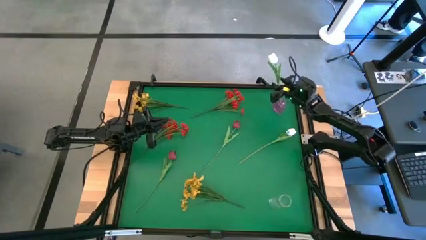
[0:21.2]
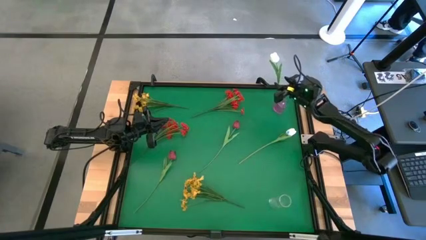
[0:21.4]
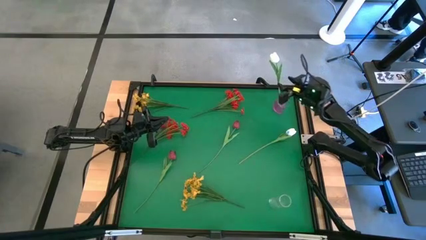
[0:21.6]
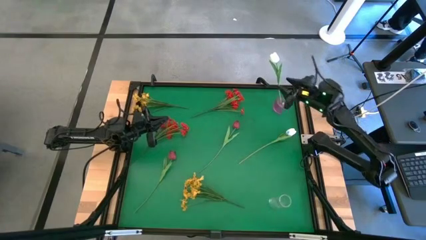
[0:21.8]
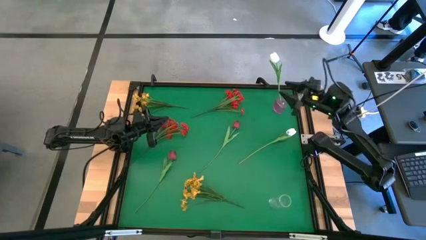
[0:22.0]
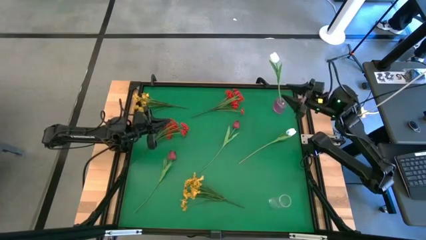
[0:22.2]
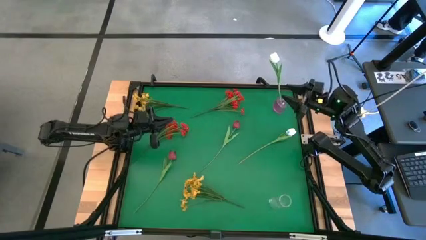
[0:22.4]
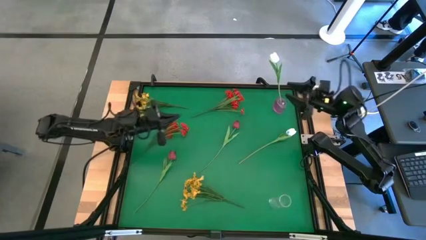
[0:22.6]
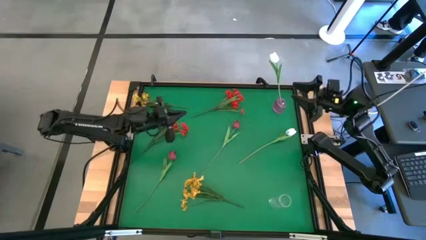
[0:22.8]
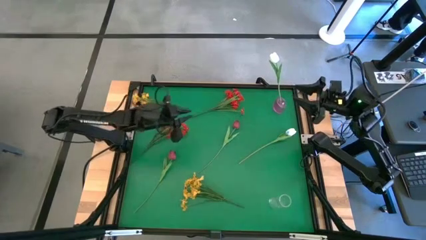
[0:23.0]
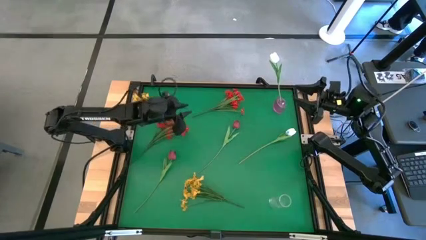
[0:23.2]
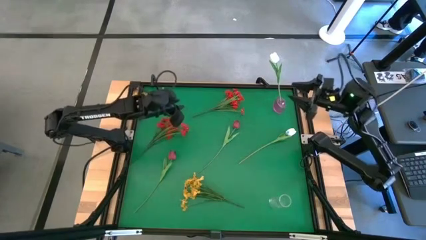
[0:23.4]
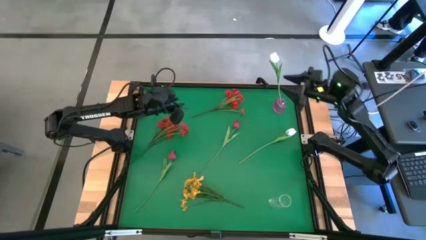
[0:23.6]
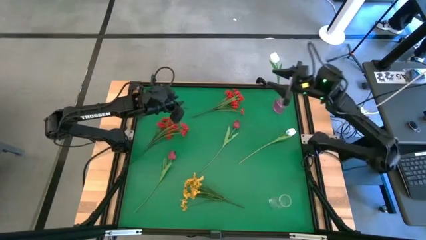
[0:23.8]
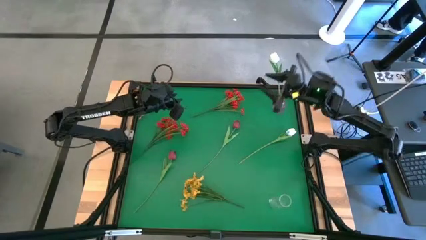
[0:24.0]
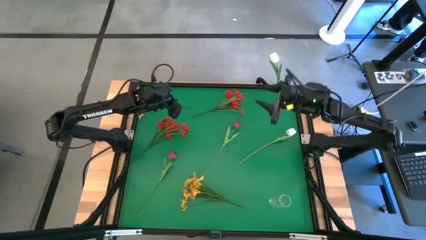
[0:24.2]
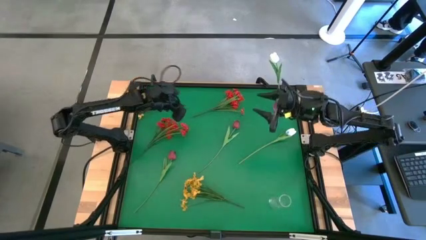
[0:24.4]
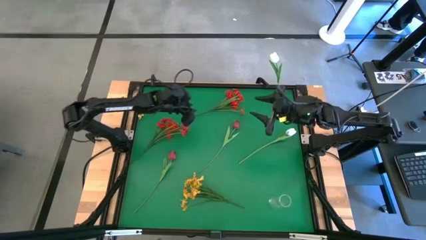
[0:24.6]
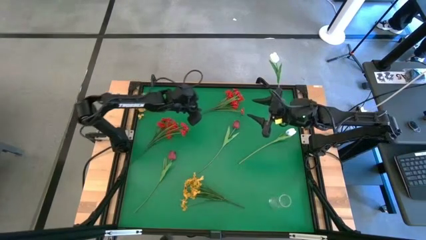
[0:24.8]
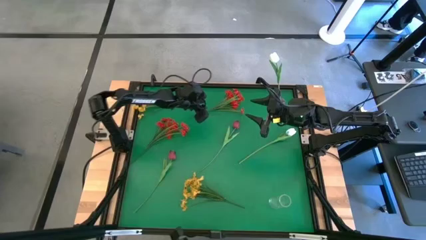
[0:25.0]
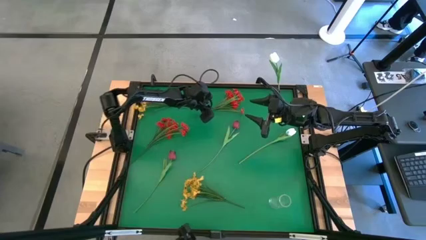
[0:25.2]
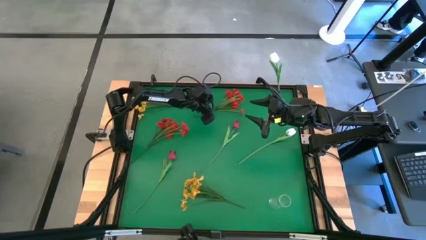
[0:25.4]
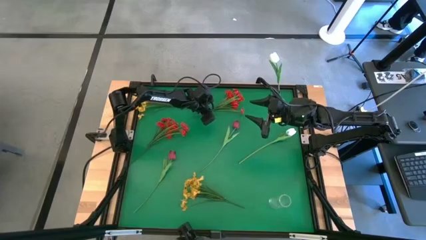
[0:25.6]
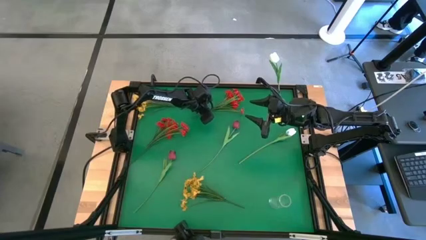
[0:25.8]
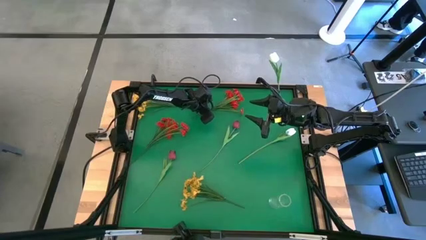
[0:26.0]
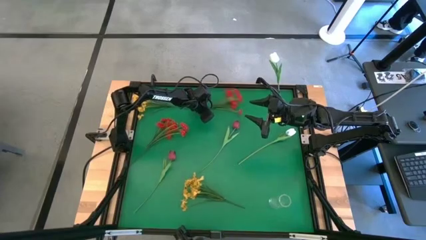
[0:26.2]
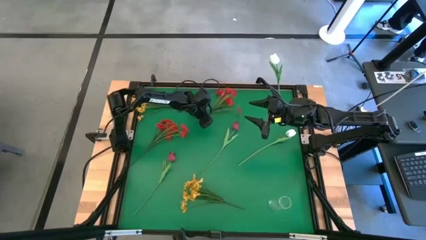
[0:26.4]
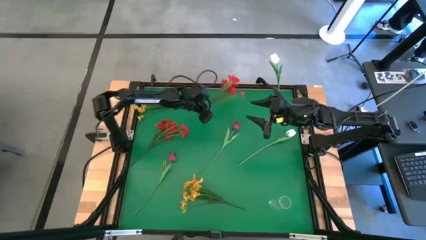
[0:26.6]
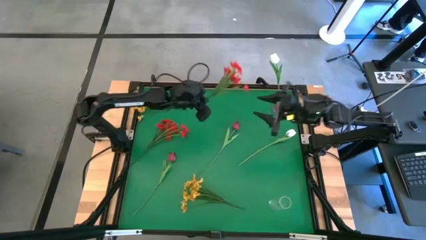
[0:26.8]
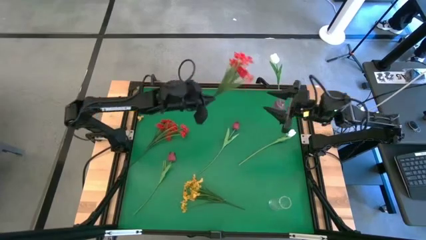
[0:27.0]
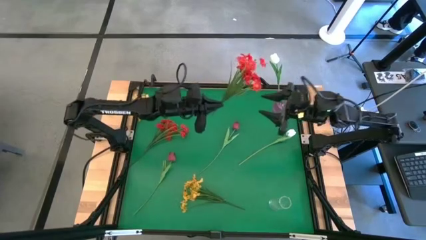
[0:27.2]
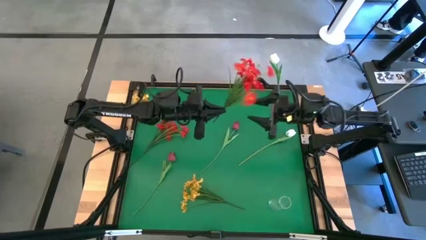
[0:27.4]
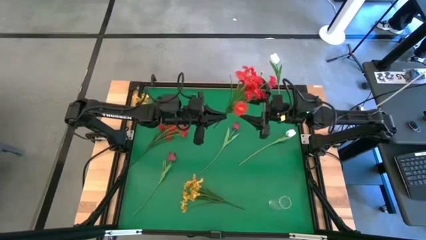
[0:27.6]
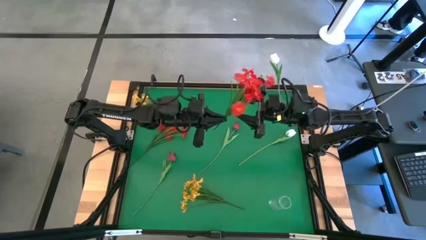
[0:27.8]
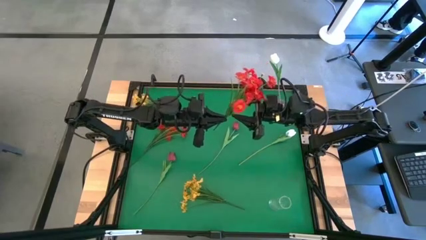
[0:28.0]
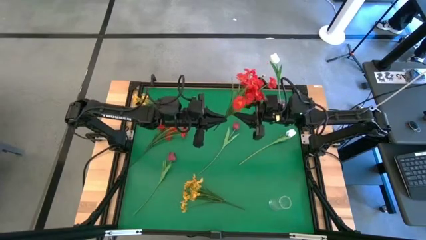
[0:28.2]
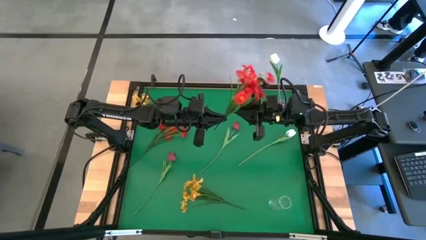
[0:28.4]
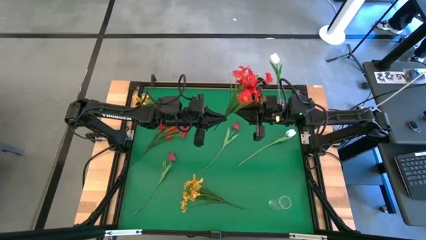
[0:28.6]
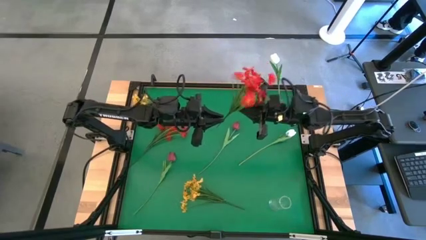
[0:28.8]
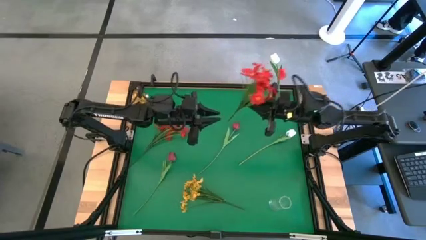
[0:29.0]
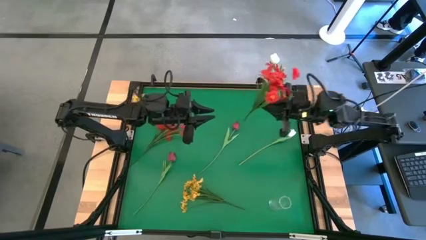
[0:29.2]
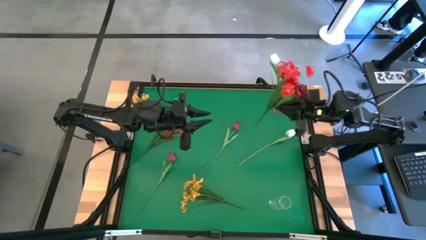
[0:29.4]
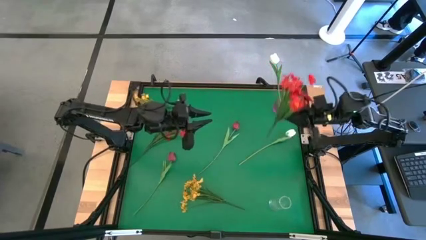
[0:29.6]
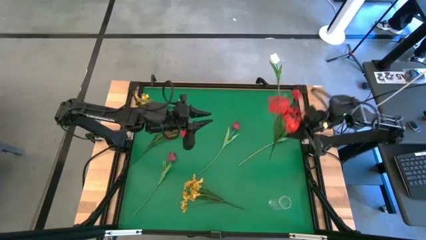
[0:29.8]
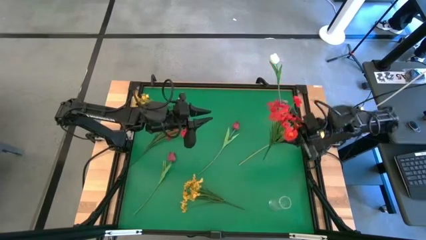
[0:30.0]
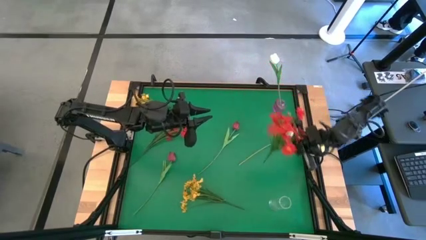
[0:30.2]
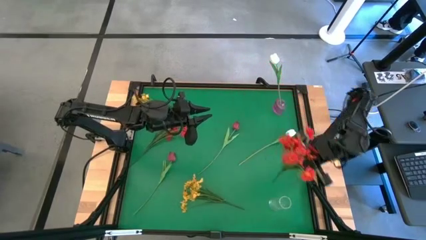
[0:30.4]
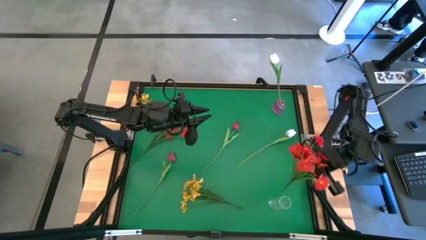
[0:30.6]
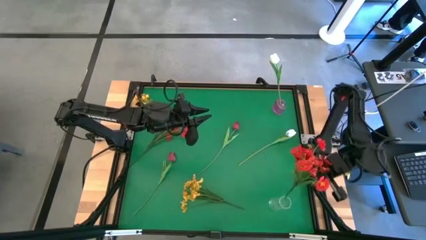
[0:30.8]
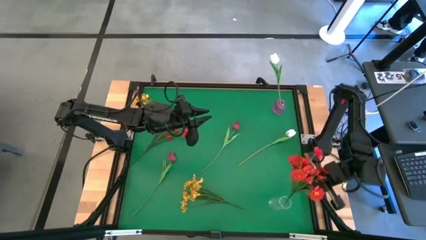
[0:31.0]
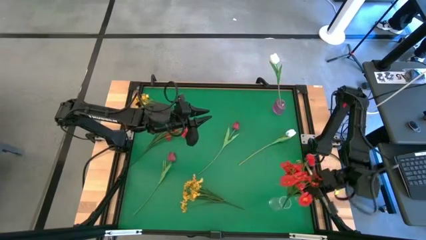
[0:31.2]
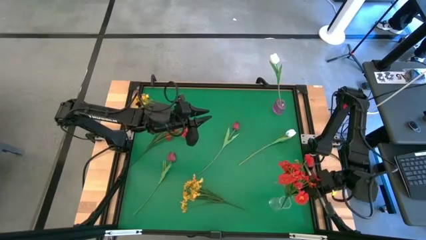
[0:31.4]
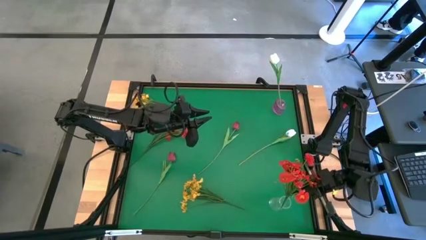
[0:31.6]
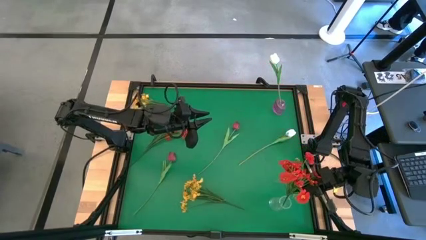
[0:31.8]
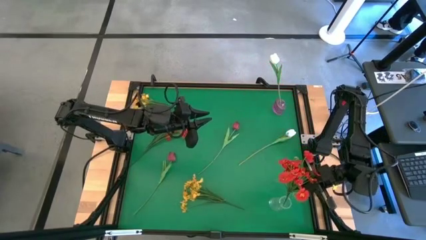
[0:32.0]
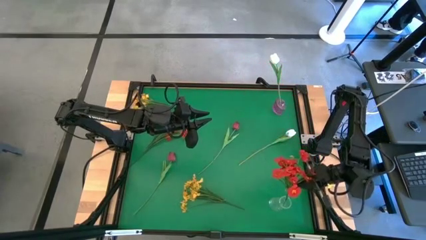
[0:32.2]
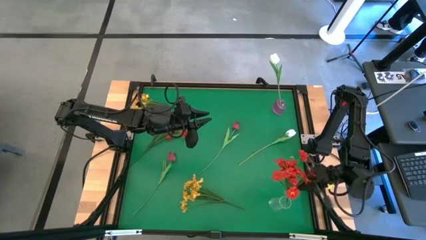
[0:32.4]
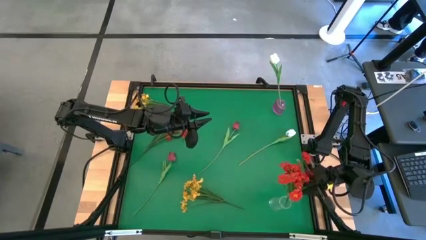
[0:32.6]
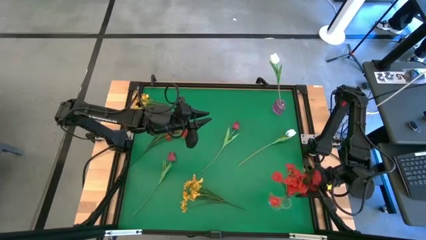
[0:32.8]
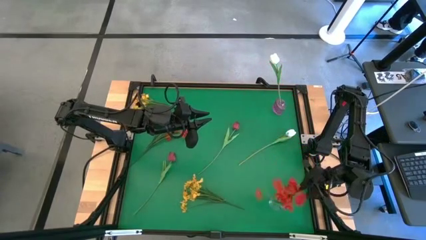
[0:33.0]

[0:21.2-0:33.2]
Task: Sort flowers into vase by color
Put the right orange flowers into the transparent vase
